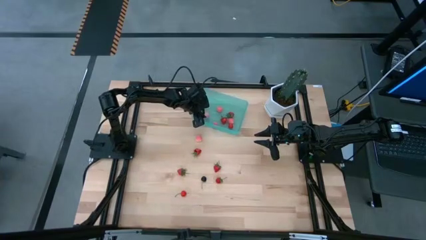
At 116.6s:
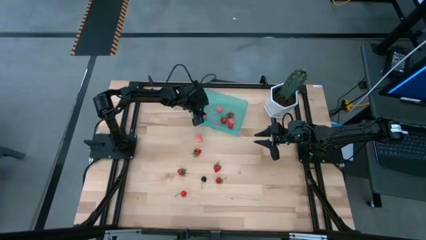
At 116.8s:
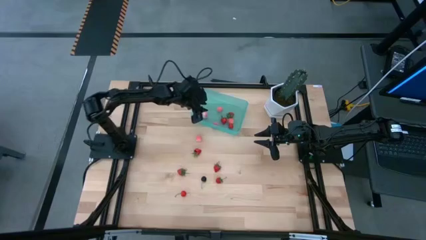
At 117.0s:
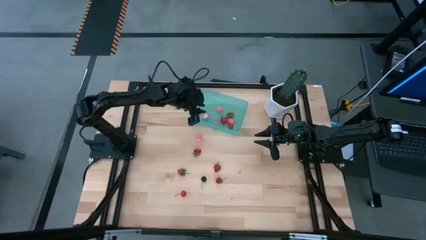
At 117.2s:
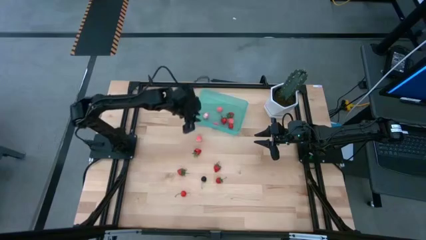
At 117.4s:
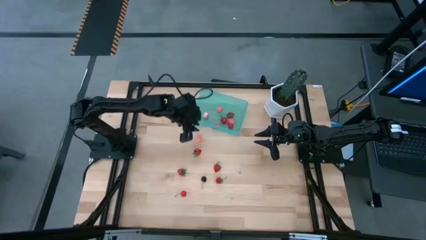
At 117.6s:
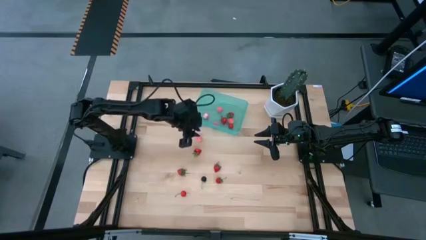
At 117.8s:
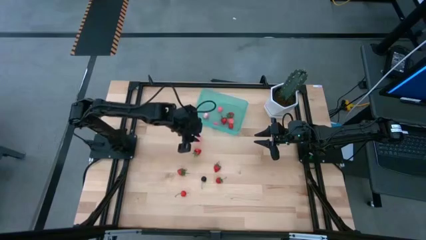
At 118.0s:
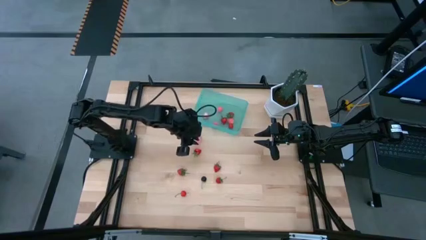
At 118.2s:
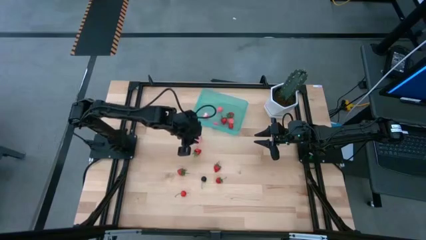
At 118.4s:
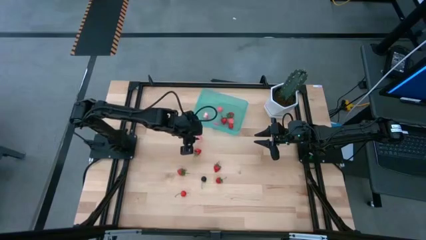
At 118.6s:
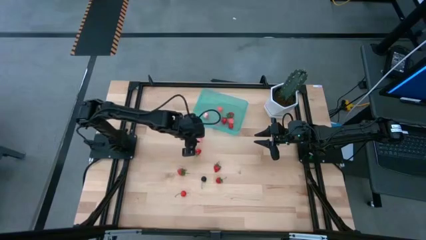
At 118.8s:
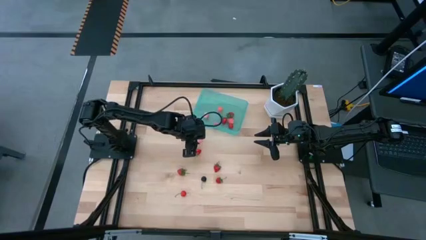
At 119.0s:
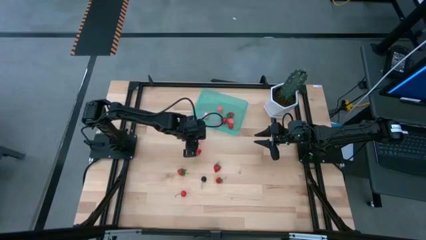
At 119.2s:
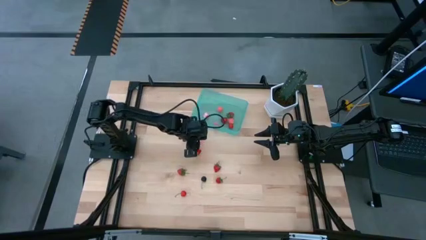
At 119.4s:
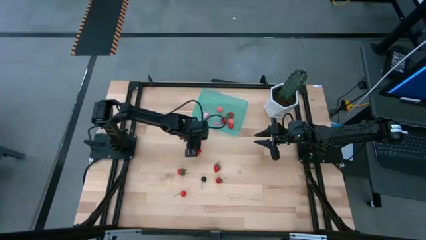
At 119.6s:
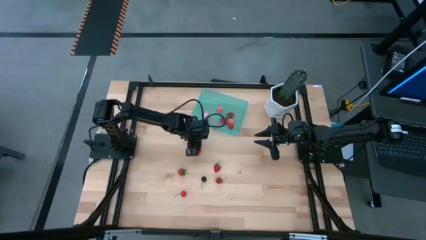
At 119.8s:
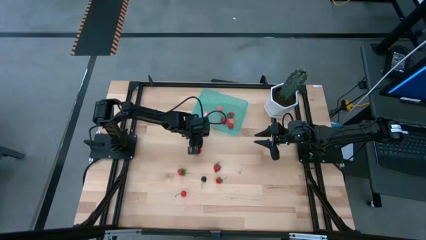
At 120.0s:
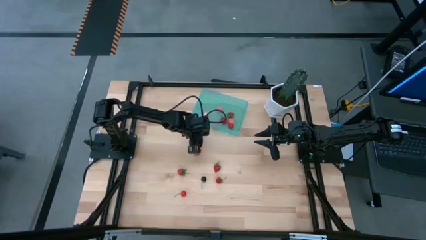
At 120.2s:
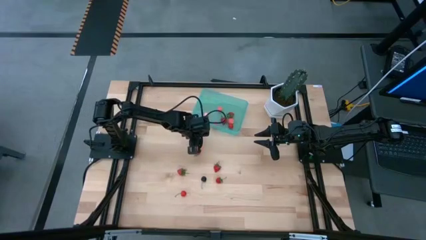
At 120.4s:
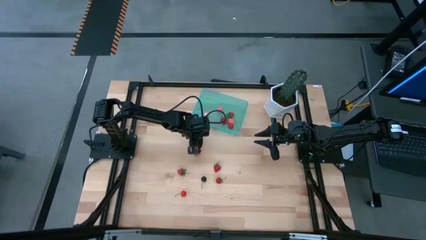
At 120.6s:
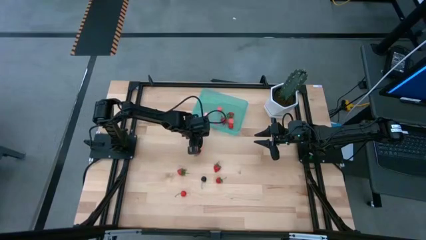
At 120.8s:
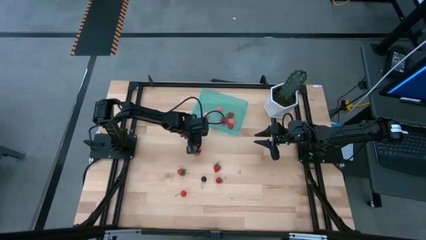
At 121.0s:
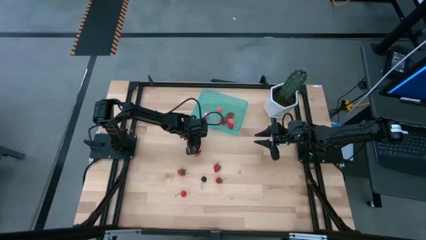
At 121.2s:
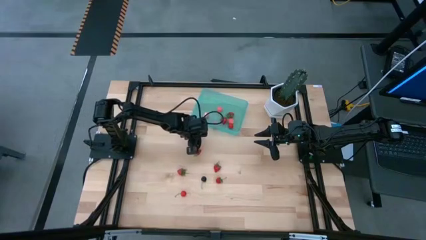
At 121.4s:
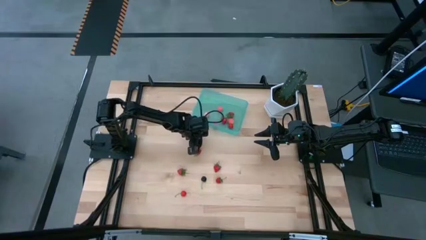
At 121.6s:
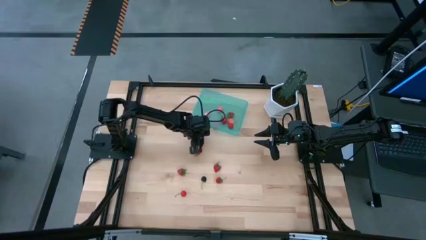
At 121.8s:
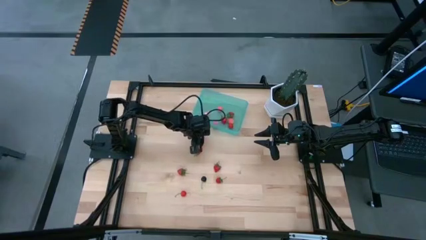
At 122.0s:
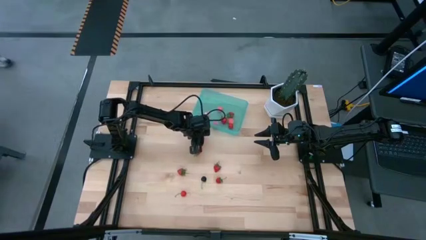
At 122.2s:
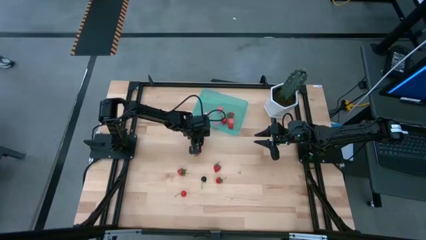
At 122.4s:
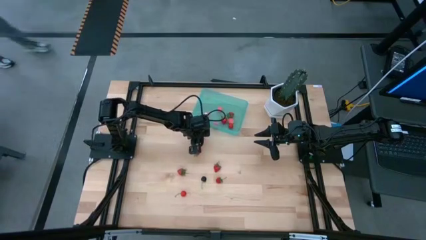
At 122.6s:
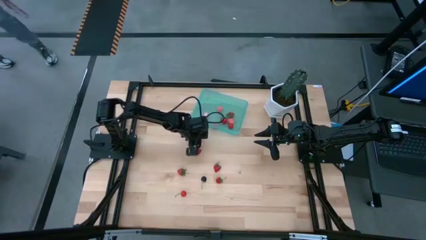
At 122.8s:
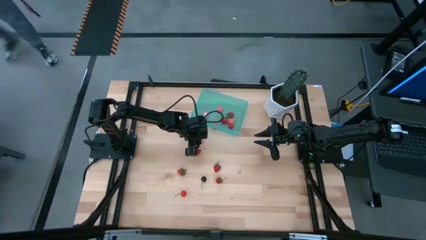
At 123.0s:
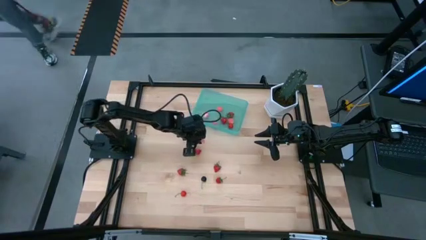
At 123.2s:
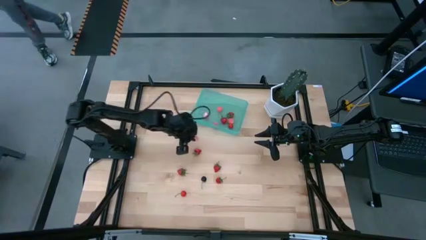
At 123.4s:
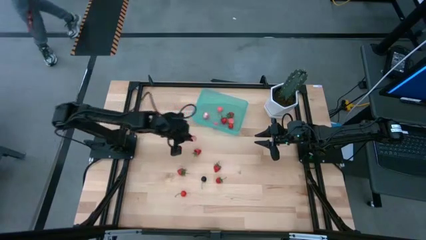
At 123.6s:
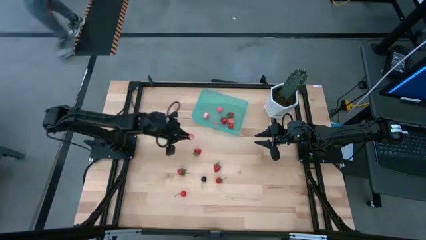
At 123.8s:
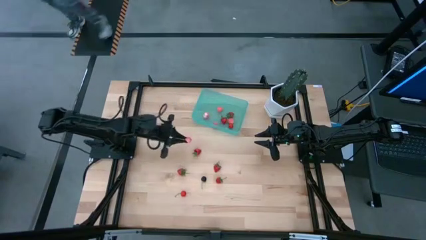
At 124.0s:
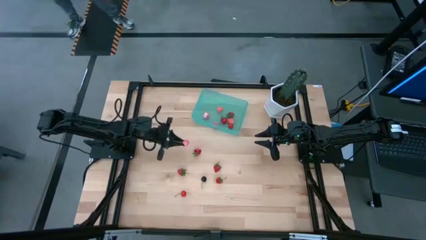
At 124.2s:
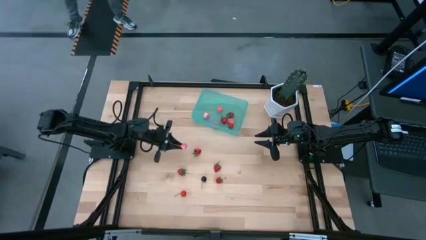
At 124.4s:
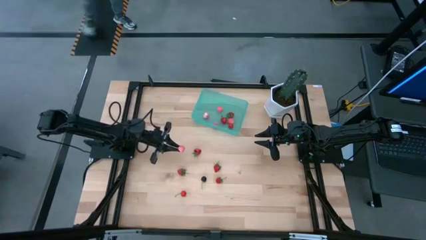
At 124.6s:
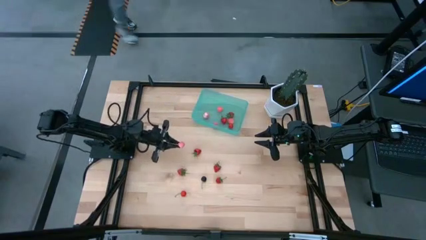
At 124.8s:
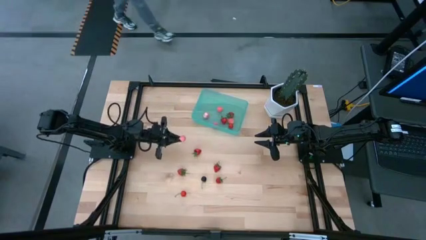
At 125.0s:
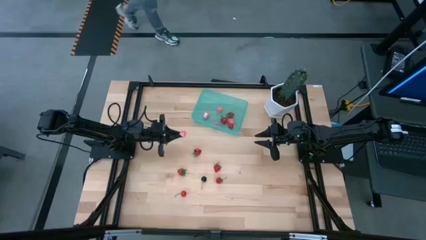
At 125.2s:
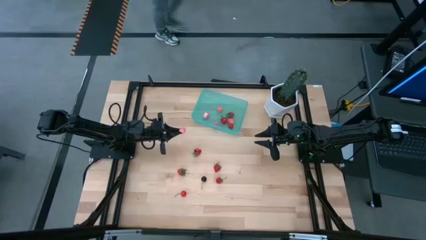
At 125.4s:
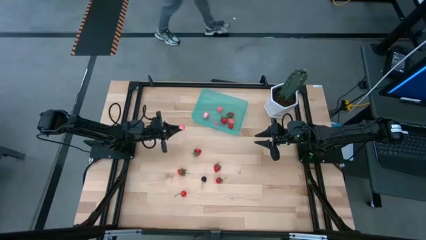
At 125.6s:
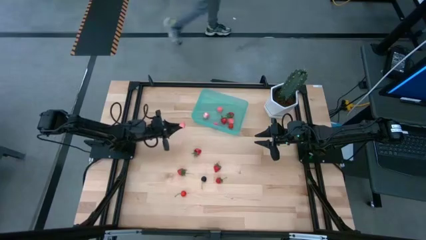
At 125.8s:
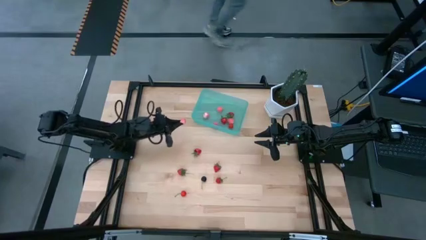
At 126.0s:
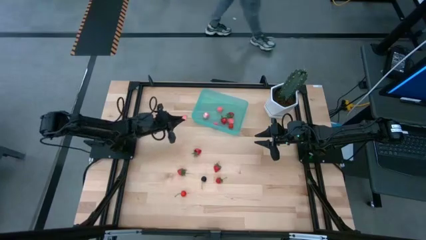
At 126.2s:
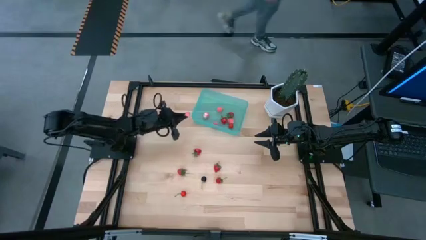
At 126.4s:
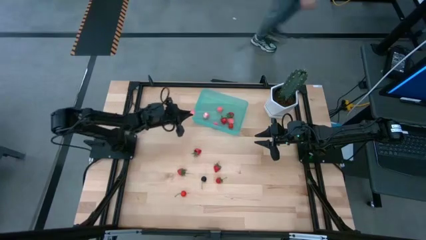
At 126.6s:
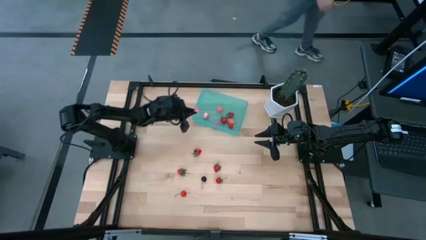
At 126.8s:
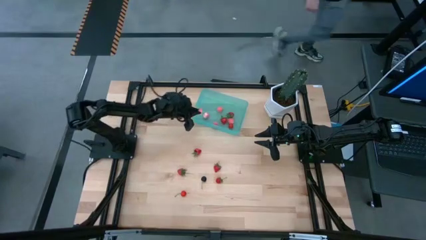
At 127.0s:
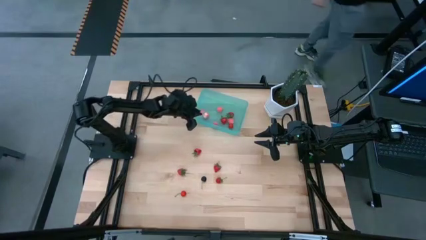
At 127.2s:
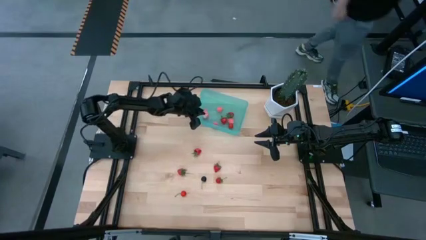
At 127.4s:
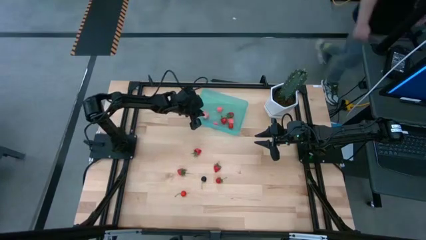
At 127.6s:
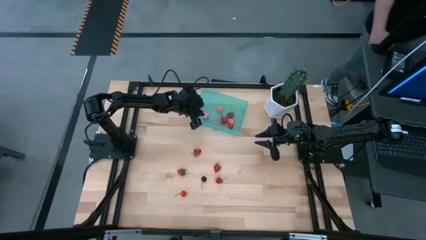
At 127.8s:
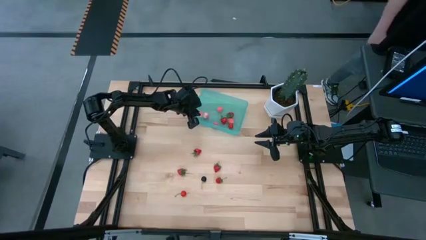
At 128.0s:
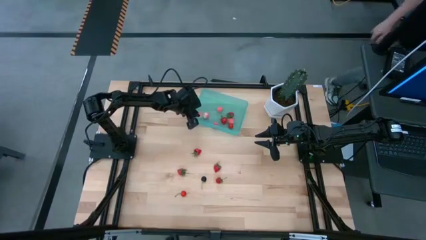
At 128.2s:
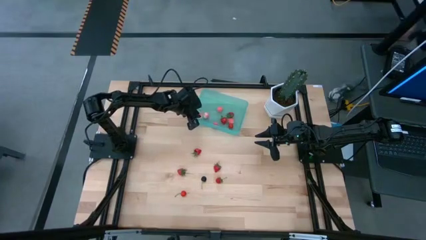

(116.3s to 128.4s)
Task: Pick and placing Produce into tupperware
Put the pink peach into the light blue bin

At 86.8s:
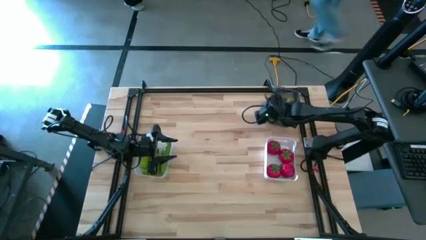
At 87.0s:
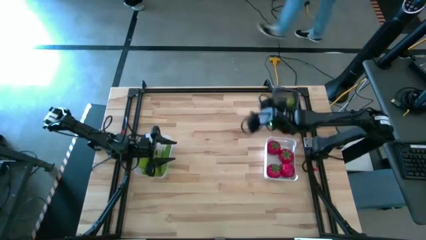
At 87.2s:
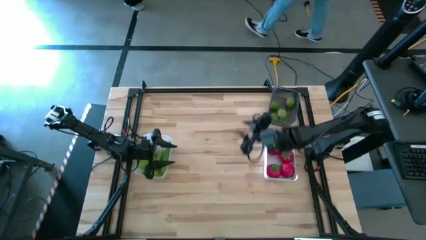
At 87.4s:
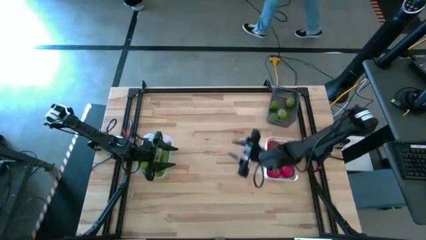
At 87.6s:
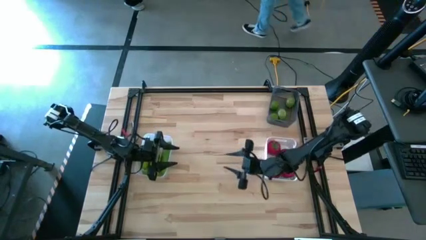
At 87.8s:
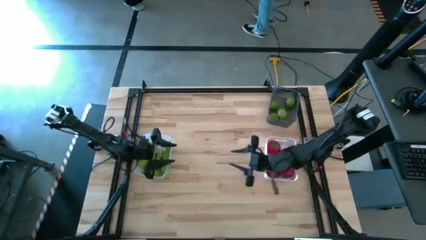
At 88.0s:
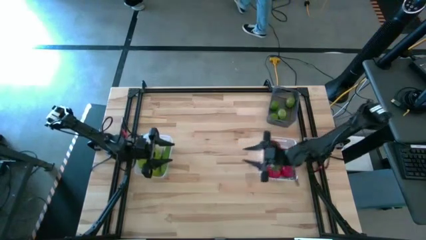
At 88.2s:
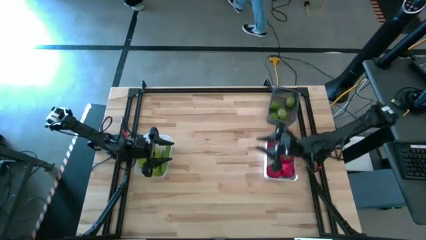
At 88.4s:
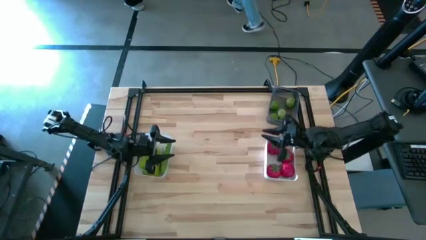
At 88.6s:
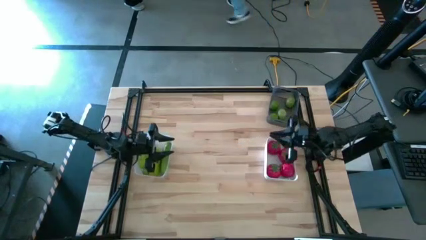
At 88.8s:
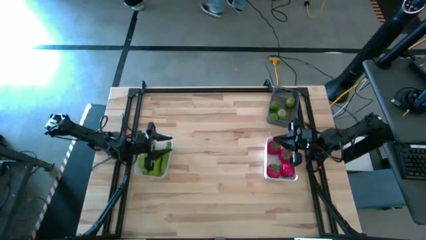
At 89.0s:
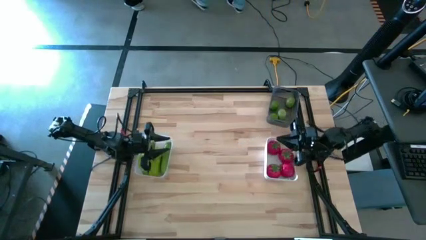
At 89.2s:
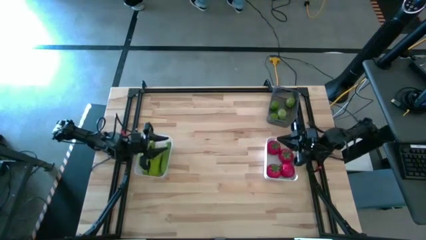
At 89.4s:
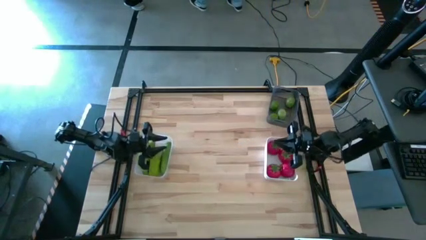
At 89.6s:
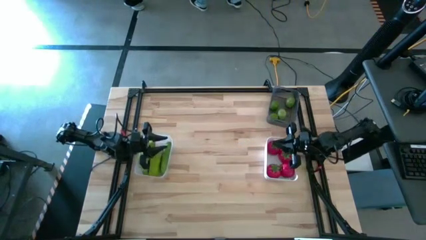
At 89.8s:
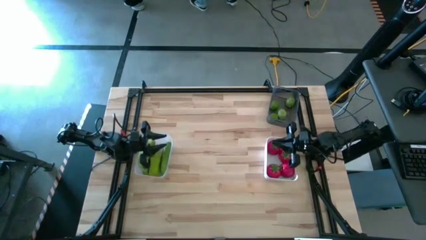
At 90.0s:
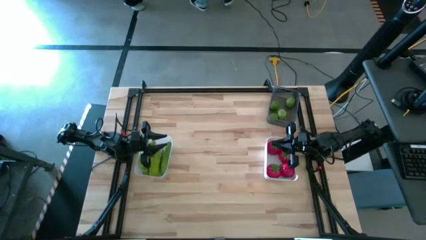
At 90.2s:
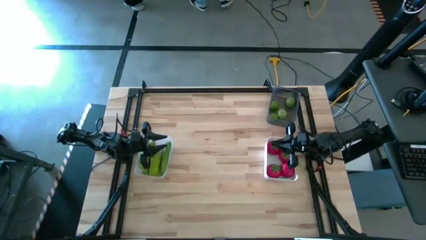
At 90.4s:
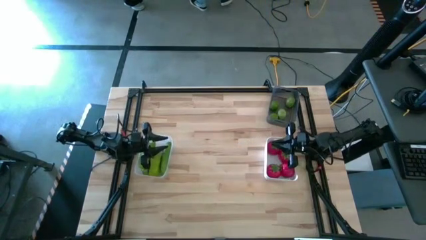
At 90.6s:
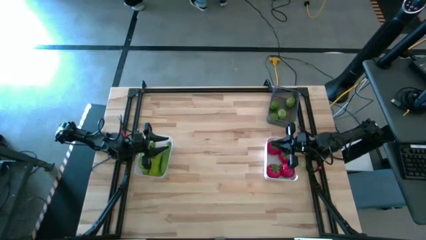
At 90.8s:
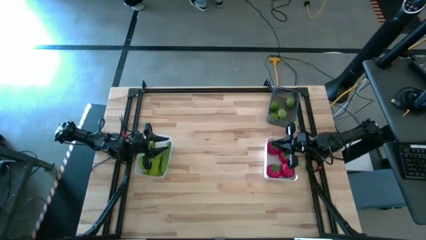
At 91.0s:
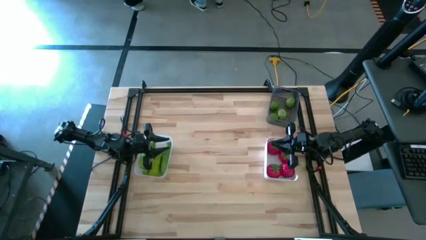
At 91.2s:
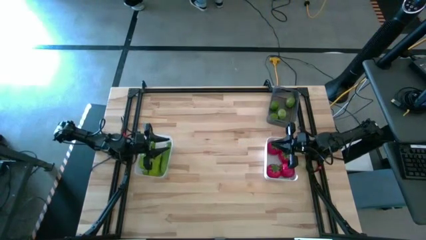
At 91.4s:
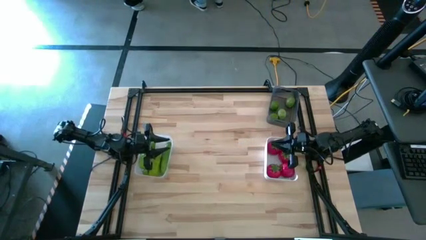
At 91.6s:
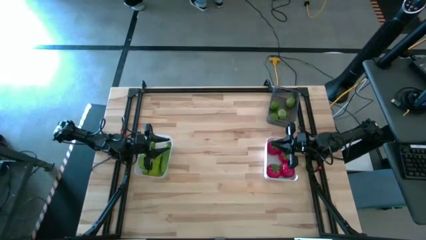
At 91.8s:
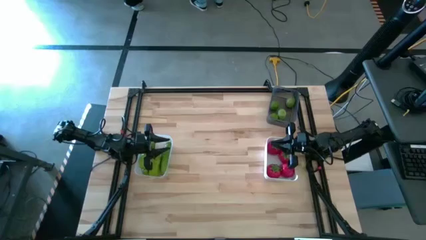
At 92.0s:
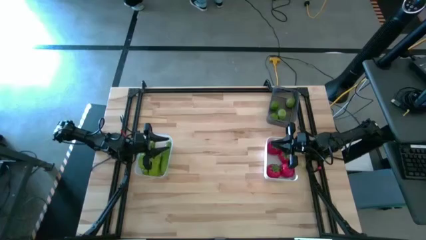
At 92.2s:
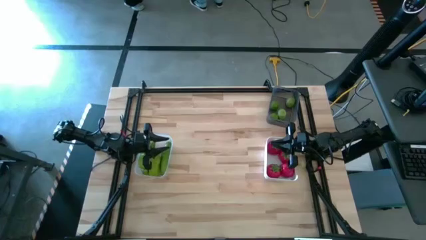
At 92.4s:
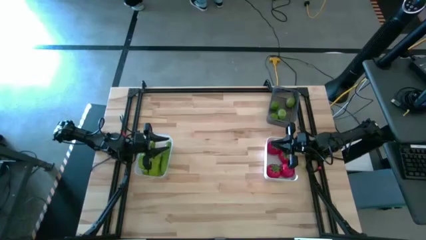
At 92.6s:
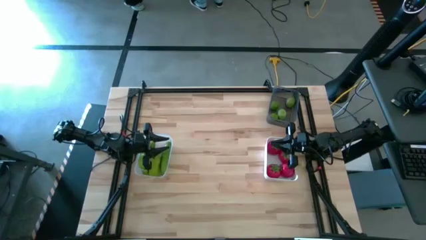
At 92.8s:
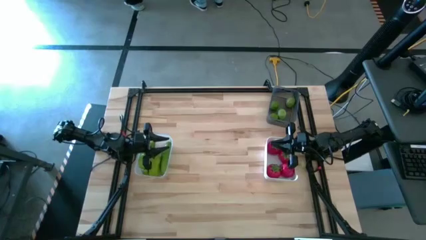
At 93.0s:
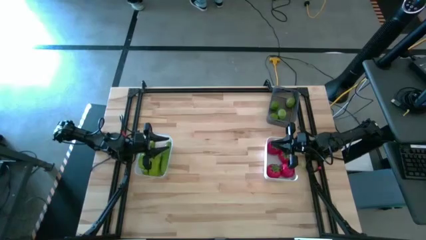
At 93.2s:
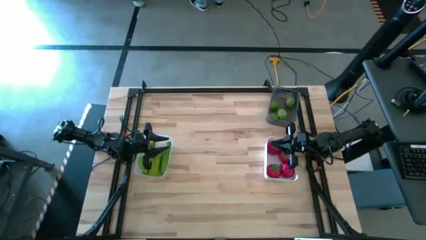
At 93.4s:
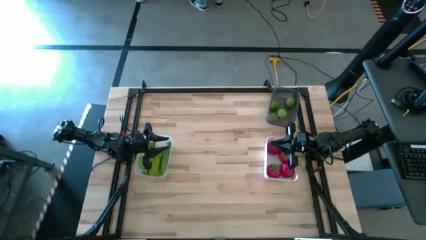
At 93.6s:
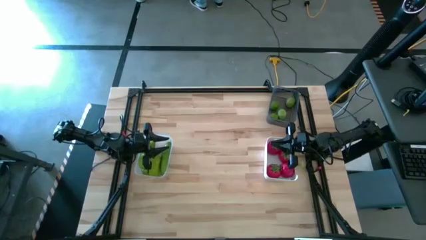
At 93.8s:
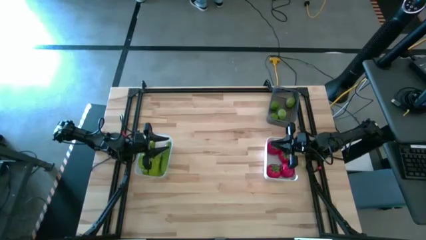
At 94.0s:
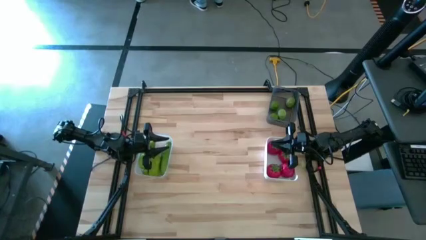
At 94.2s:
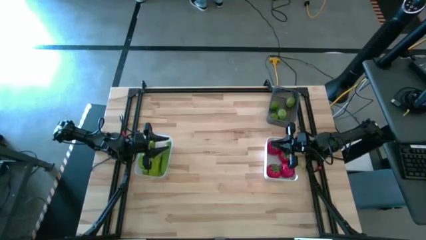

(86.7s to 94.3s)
Task: Sort produce into baskets
Return to Home Position
